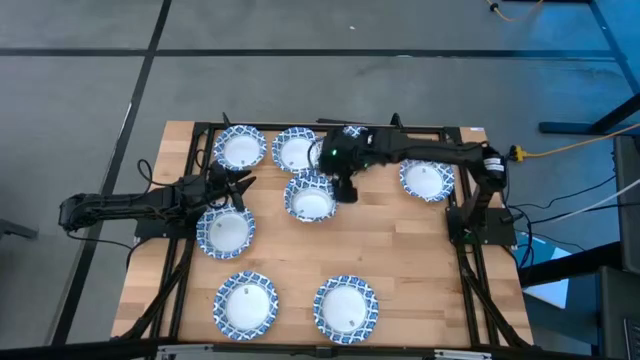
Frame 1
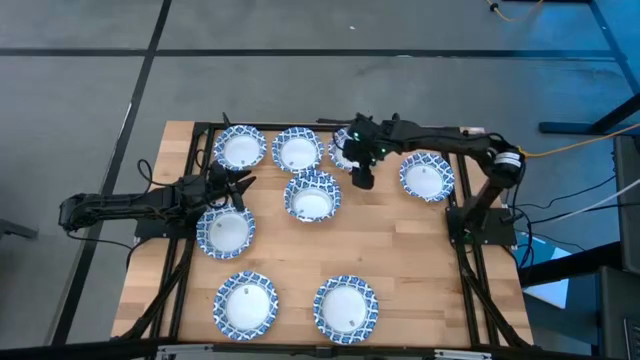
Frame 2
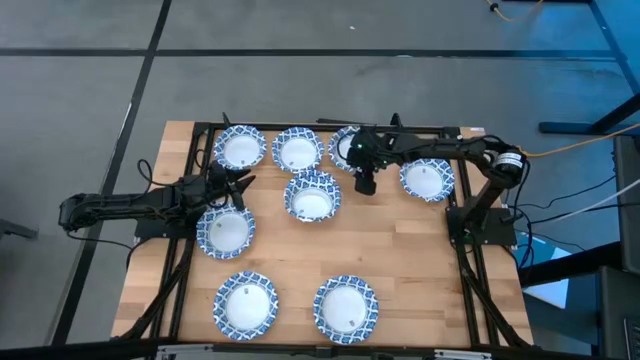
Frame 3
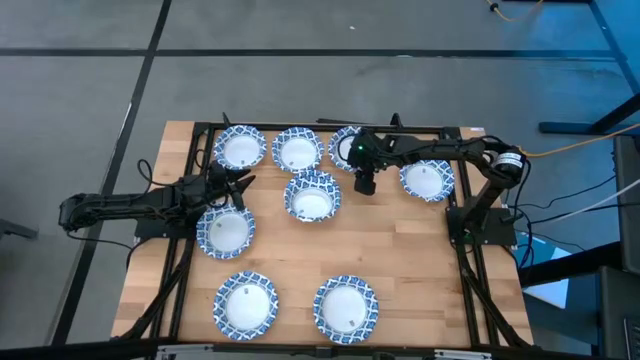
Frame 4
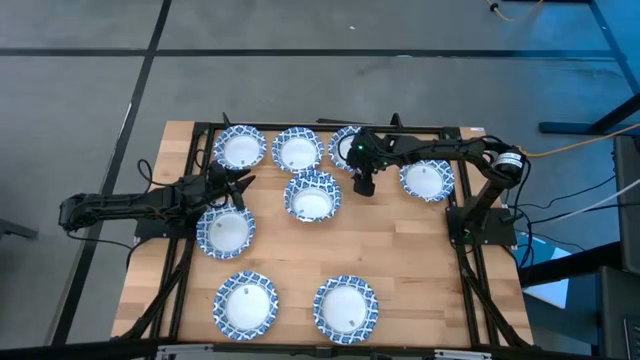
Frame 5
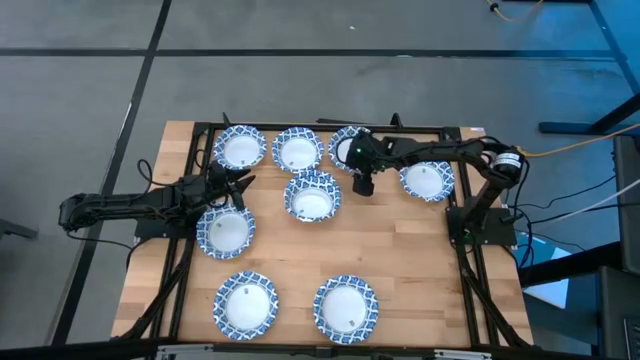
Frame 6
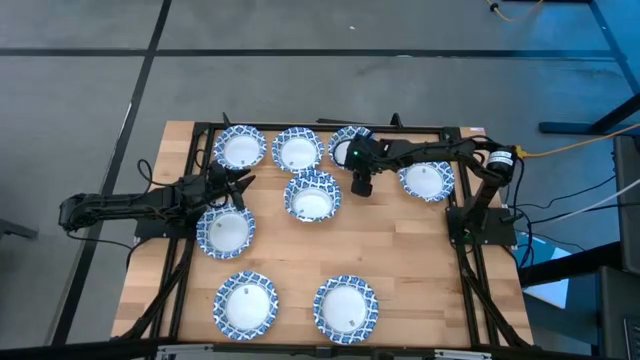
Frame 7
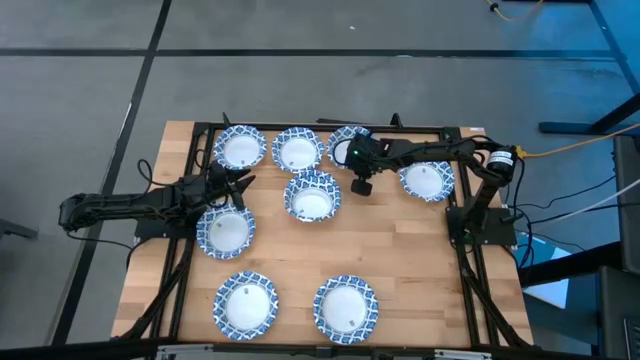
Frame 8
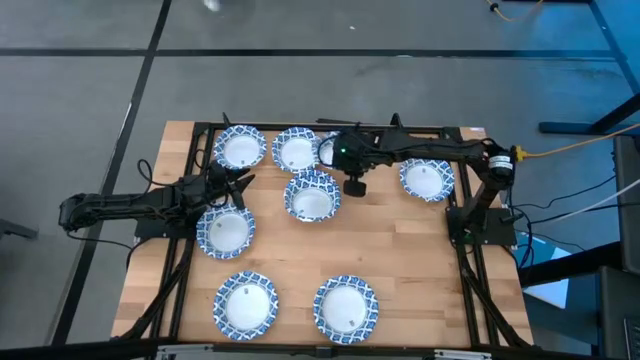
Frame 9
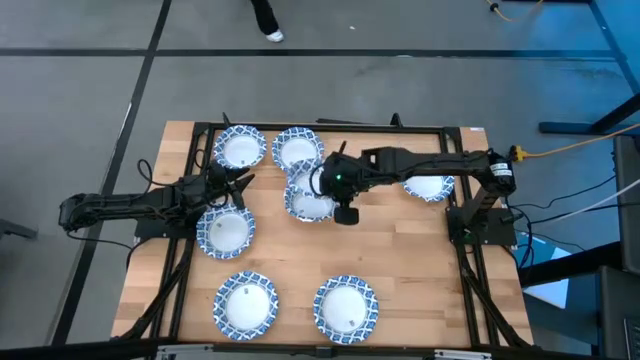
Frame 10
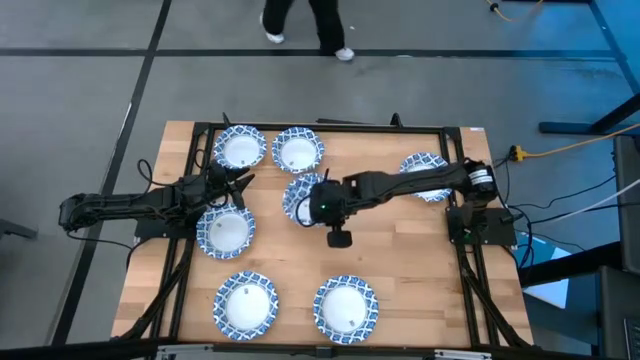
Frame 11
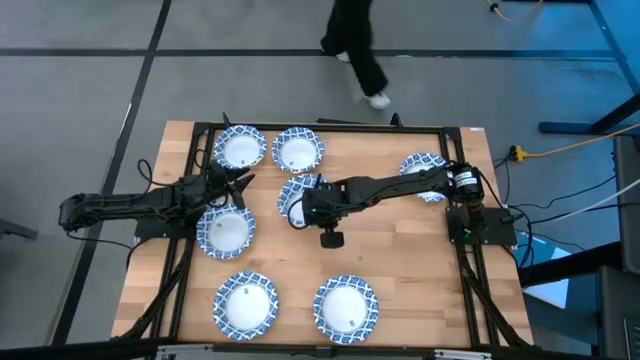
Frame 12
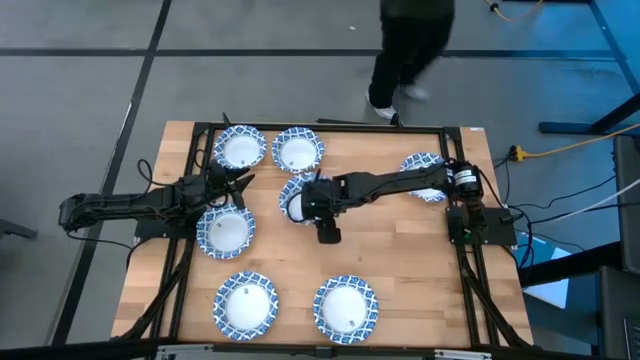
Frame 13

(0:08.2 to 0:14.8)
Task: Nest bowls inside each other
Stack the white bowl on top of the white bowl

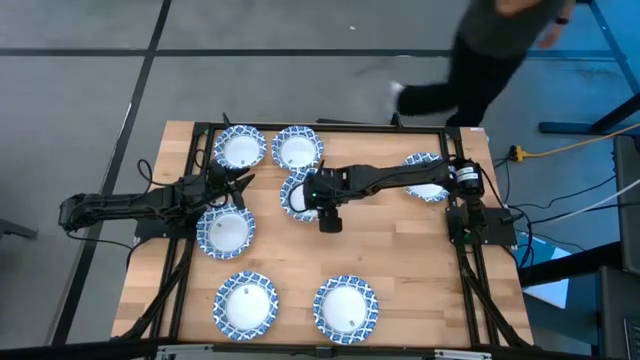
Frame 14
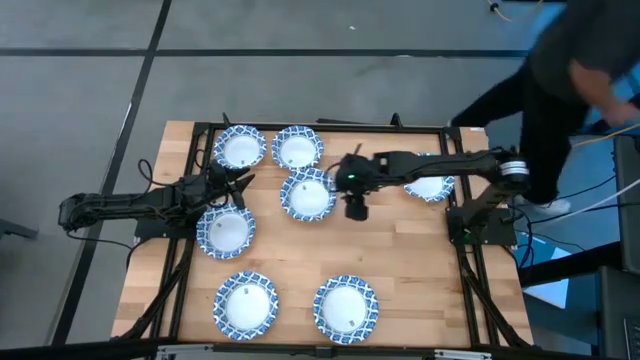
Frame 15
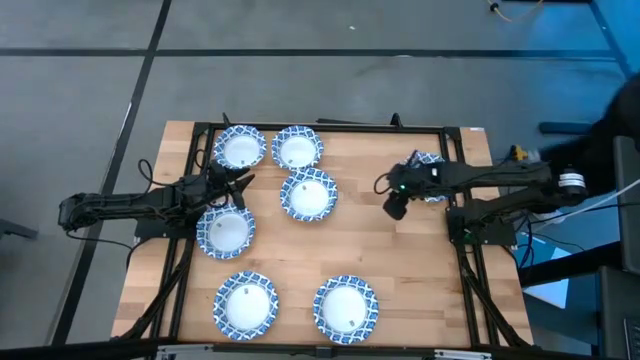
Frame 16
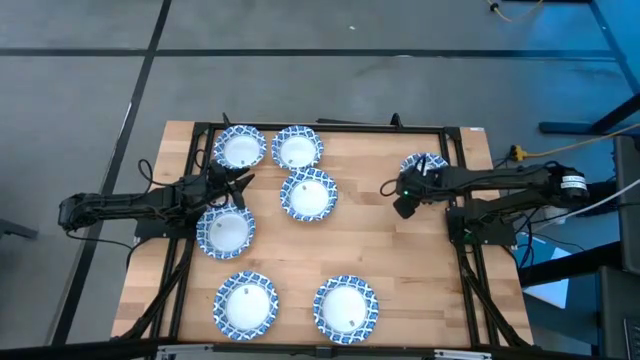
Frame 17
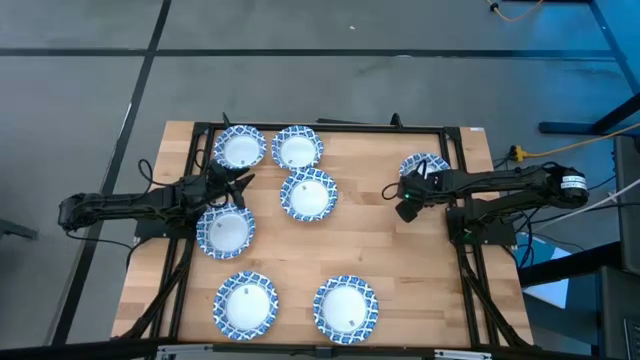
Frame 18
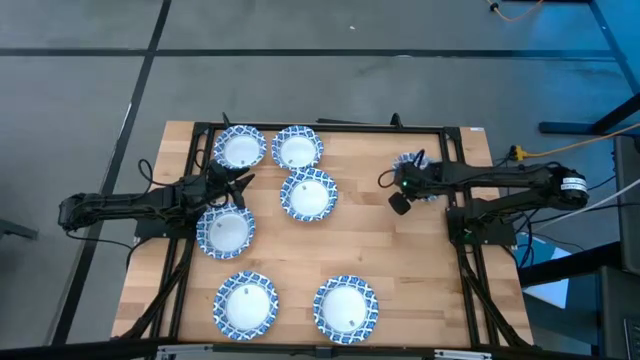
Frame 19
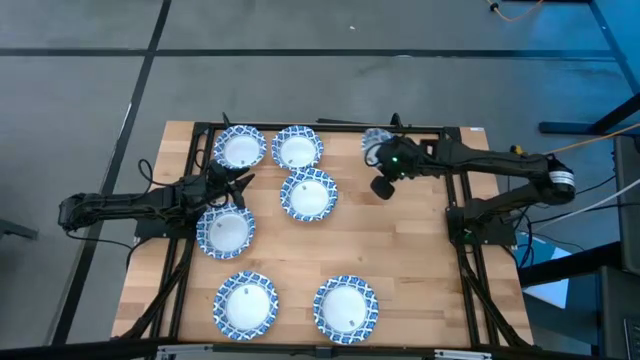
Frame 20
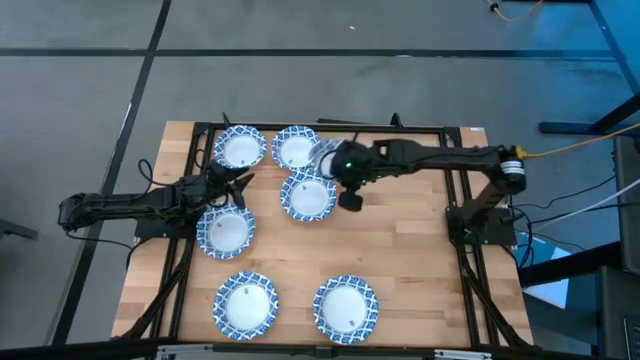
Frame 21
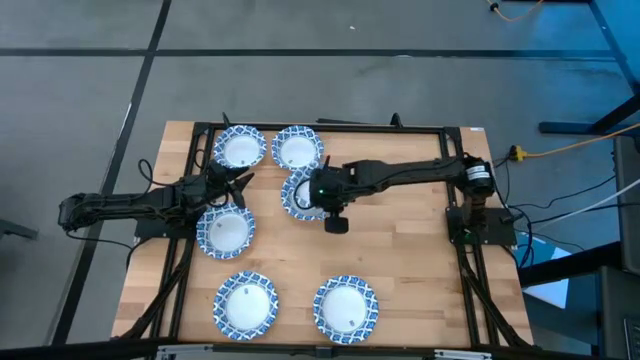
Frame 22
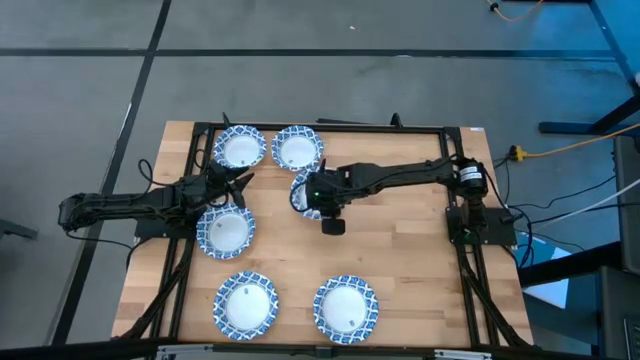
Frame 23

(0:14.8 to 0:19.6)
Stack the white bowl on top of the white bowl

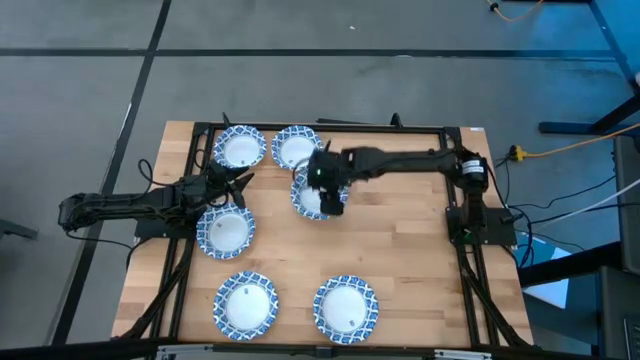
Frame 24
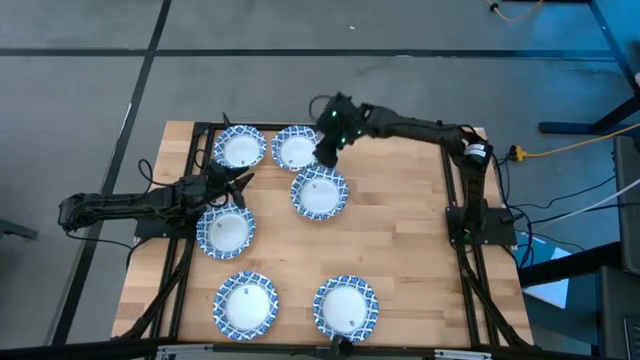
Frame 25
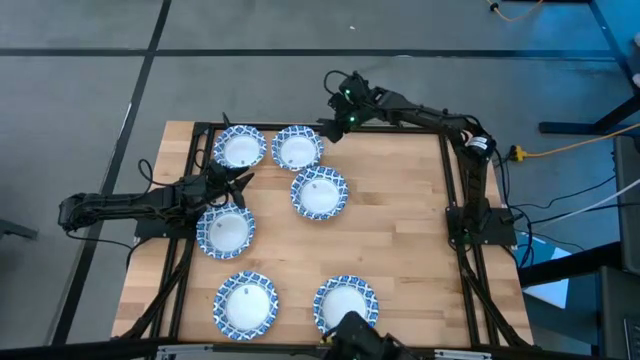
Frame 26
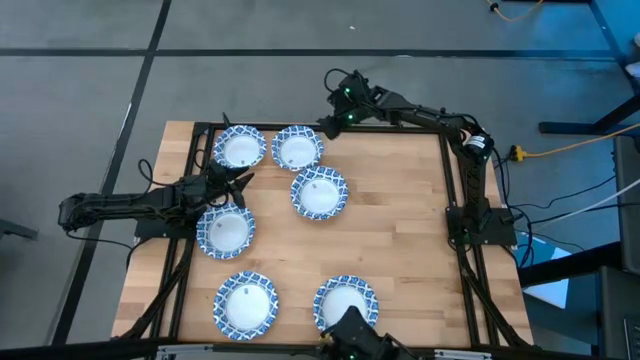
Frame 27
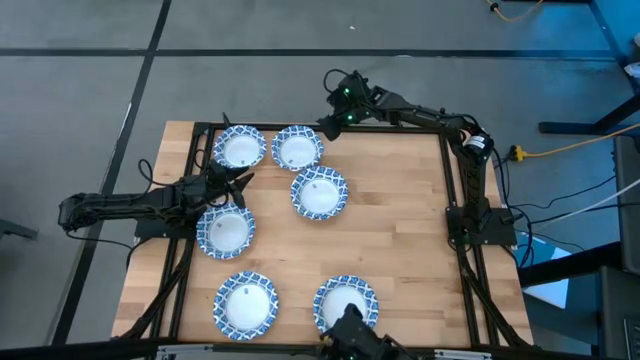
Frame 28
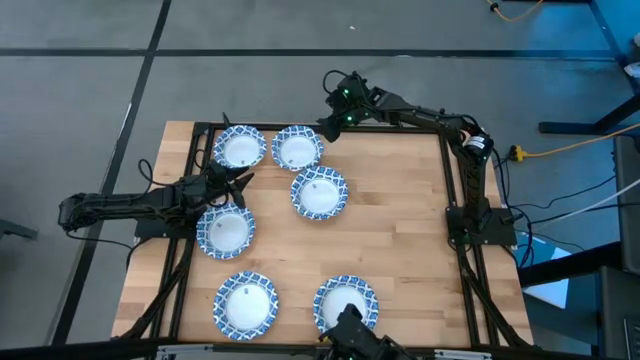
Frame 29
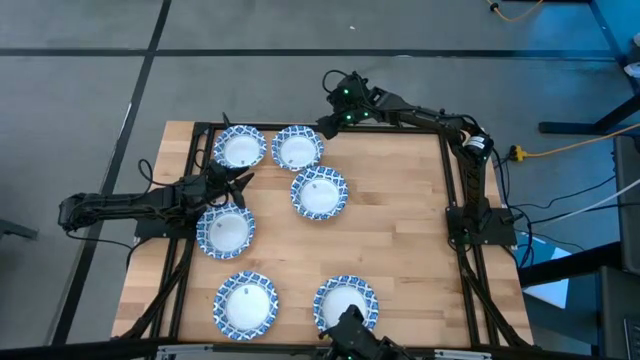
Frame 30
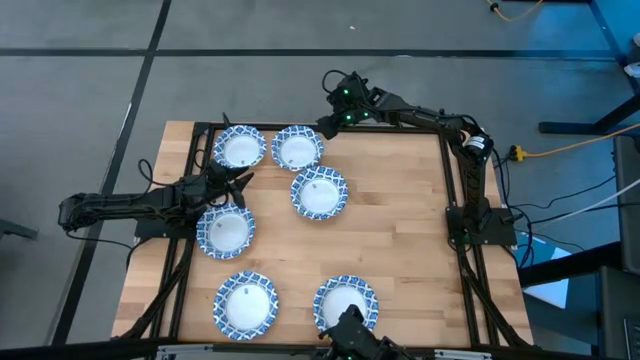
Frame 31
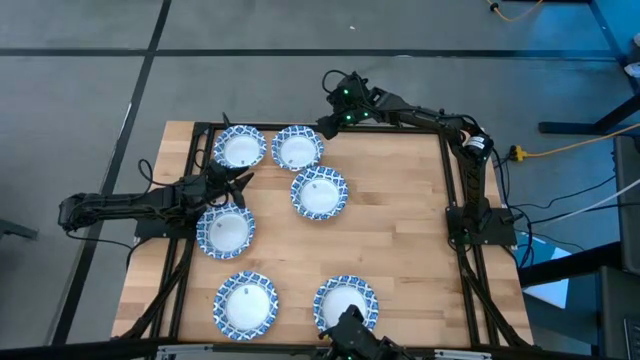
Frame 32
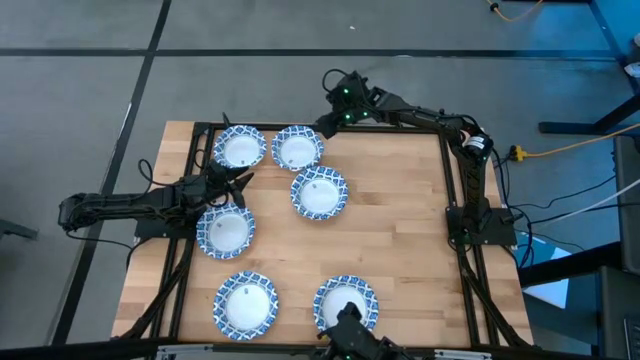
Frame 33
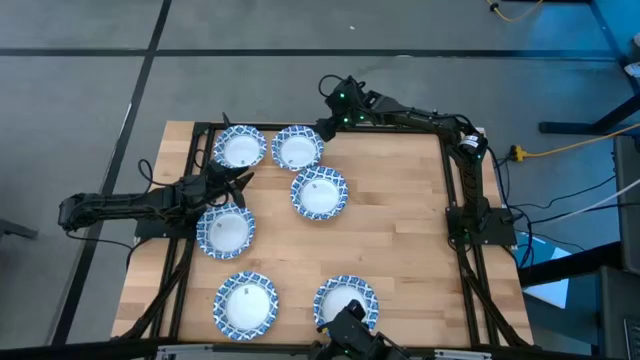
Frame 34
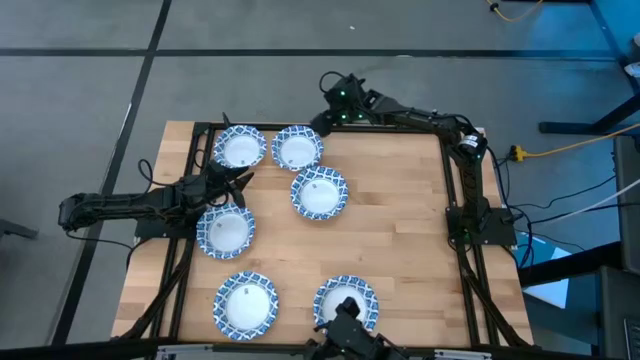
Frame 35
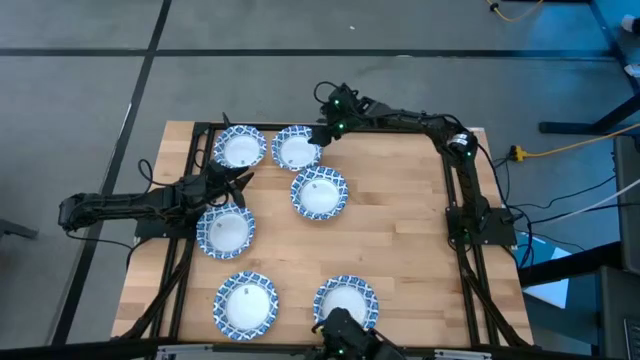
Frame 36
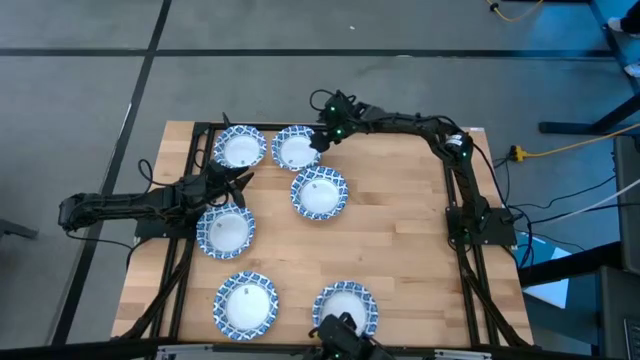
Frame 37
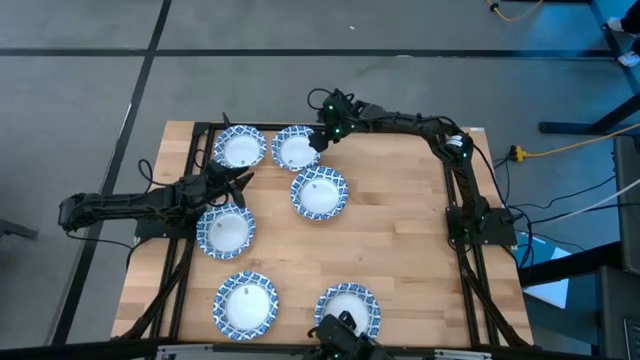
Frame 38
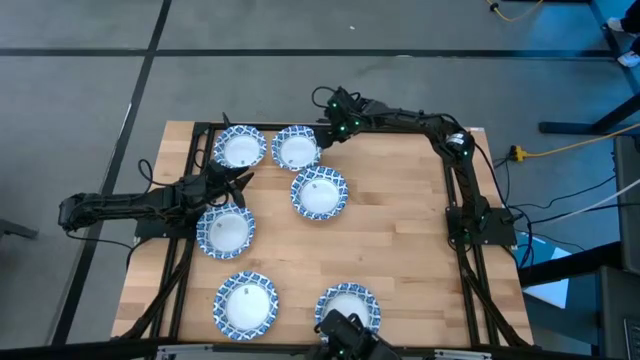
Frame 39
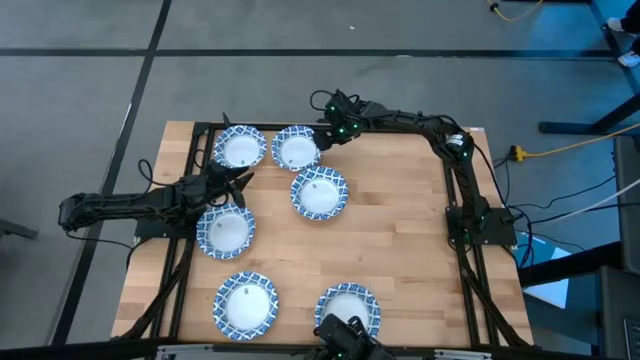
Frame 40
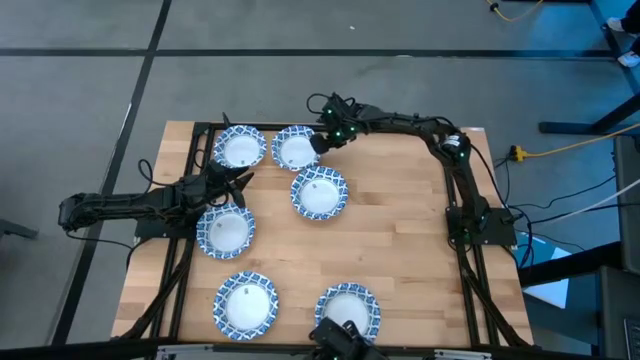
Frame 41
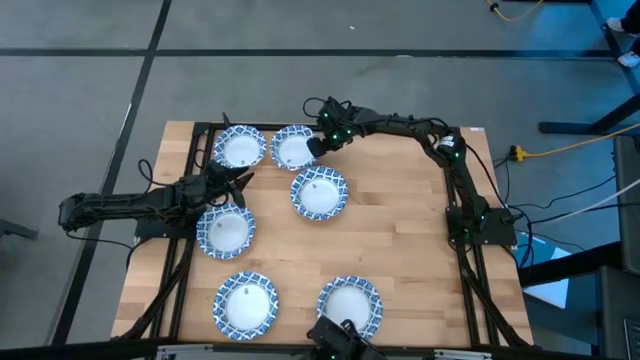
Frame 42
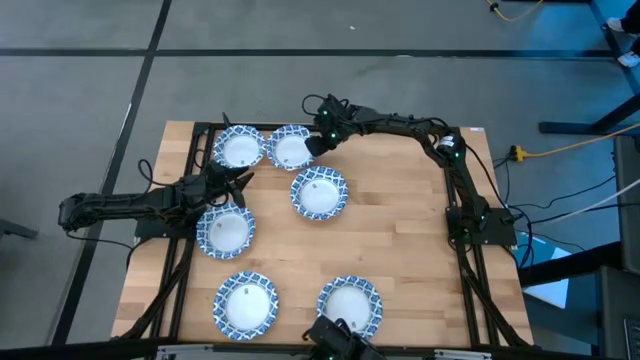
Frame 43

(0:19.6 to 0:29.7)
Stack the white bowl on top of the white bowl
